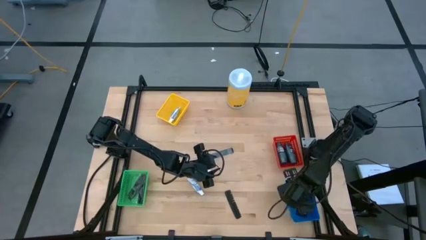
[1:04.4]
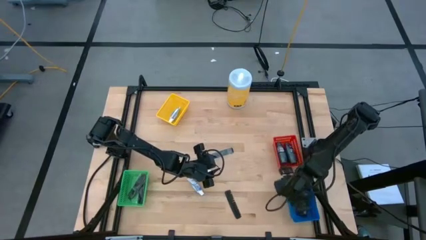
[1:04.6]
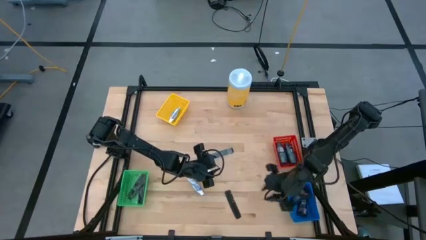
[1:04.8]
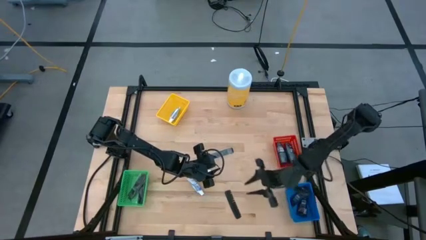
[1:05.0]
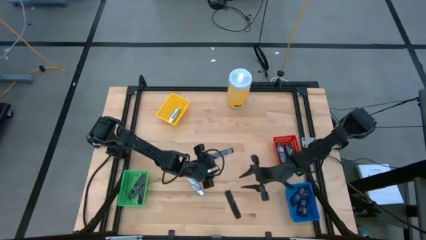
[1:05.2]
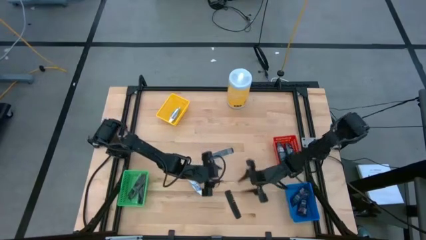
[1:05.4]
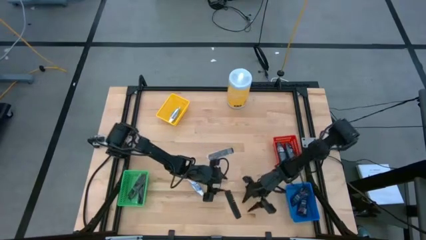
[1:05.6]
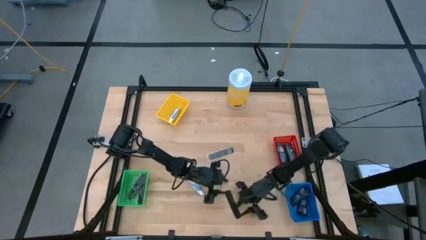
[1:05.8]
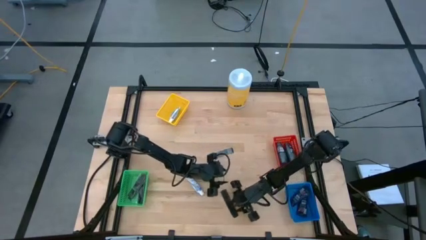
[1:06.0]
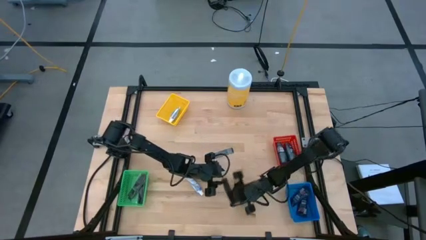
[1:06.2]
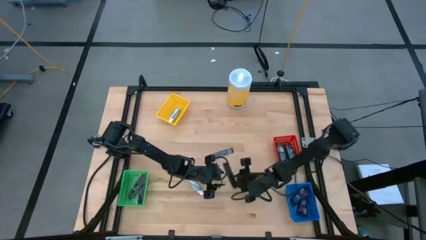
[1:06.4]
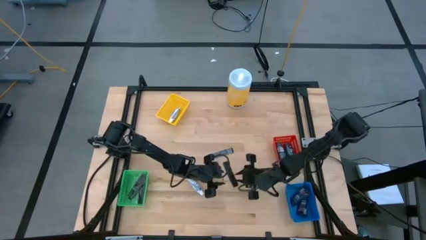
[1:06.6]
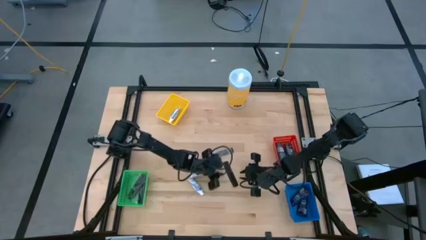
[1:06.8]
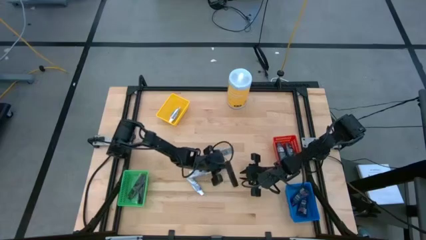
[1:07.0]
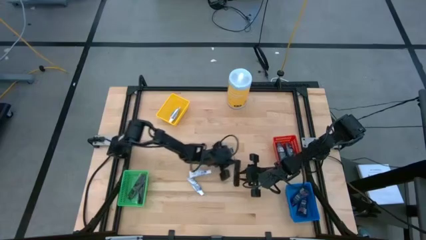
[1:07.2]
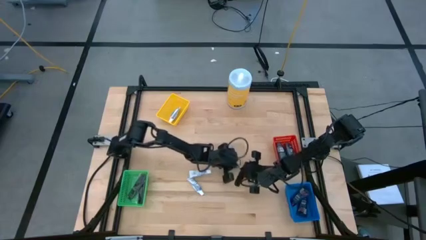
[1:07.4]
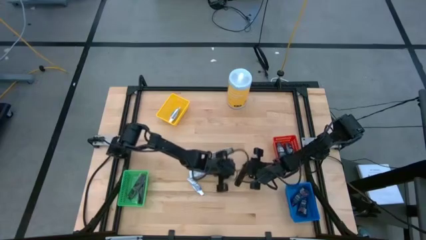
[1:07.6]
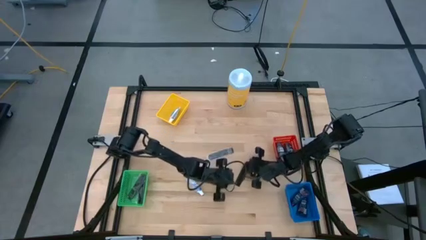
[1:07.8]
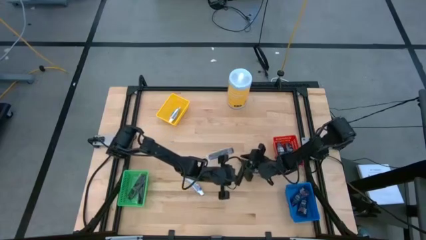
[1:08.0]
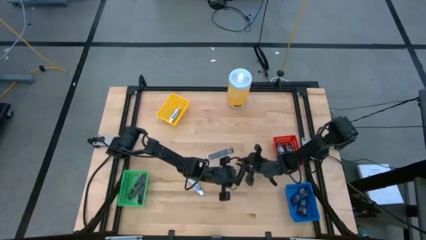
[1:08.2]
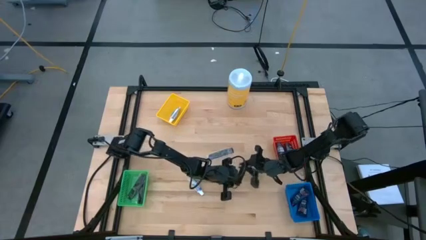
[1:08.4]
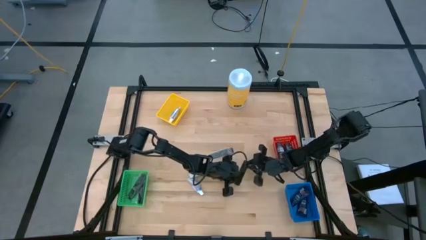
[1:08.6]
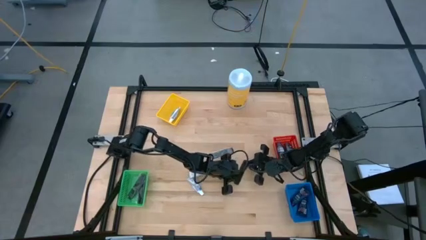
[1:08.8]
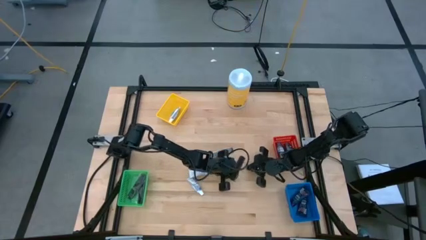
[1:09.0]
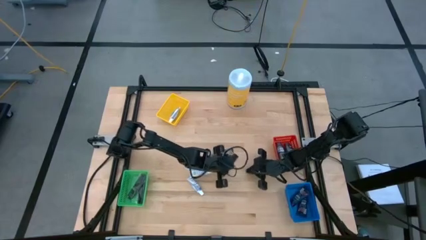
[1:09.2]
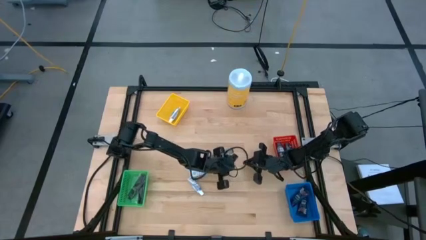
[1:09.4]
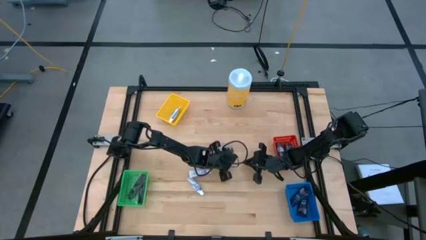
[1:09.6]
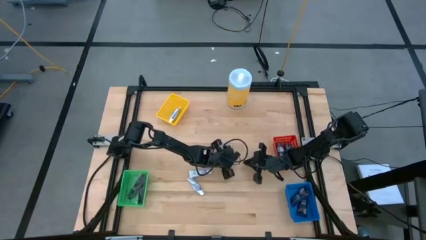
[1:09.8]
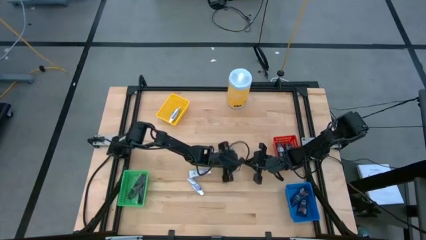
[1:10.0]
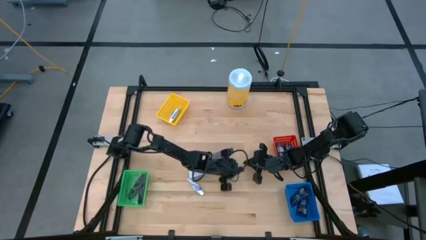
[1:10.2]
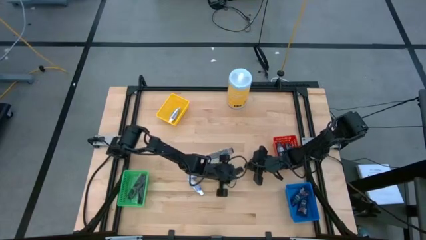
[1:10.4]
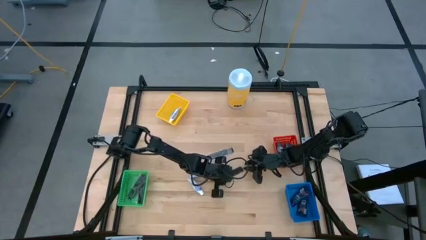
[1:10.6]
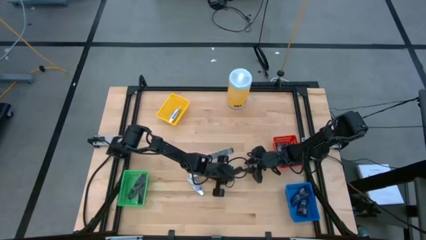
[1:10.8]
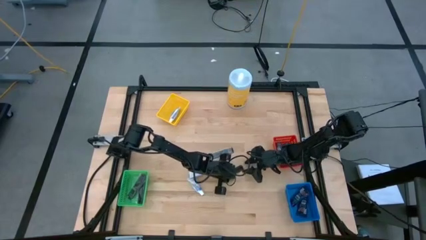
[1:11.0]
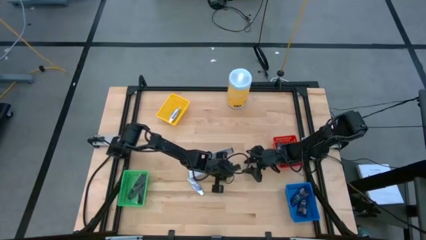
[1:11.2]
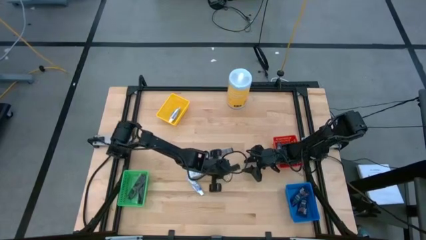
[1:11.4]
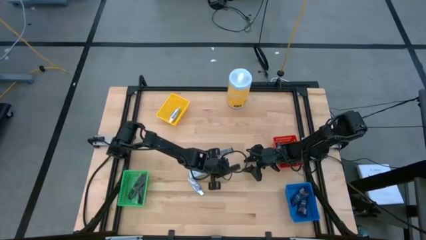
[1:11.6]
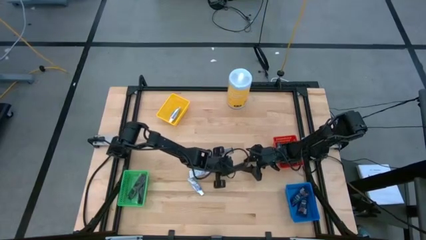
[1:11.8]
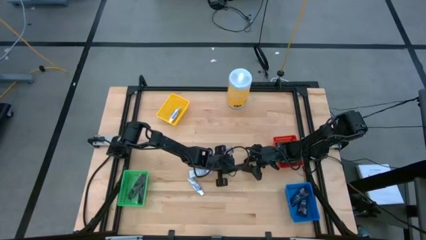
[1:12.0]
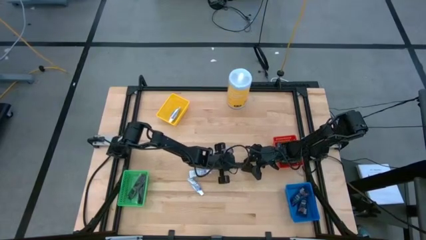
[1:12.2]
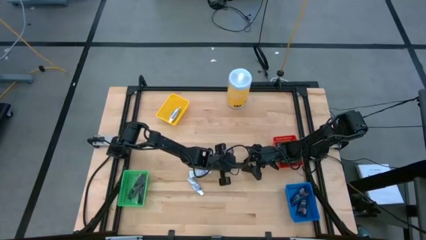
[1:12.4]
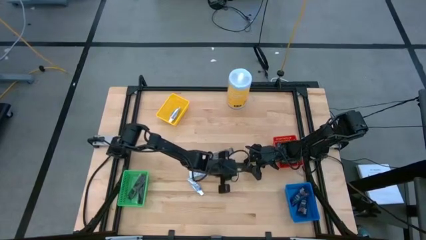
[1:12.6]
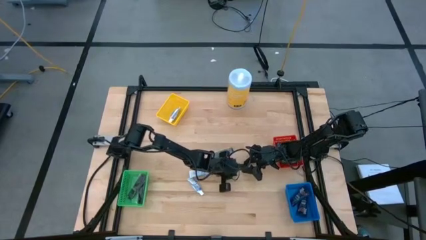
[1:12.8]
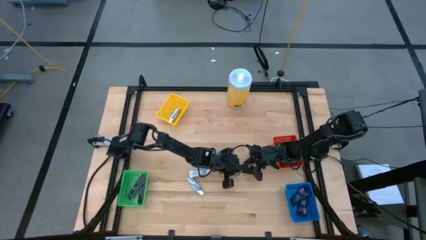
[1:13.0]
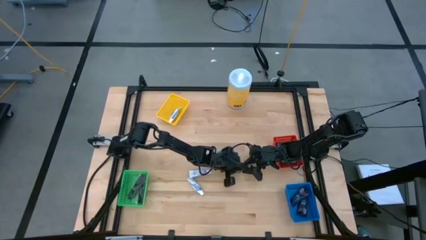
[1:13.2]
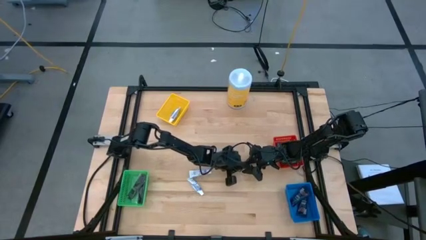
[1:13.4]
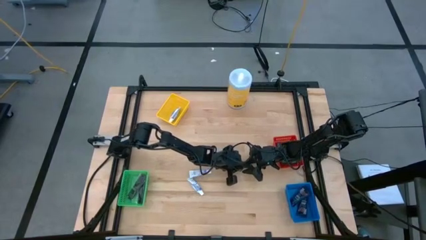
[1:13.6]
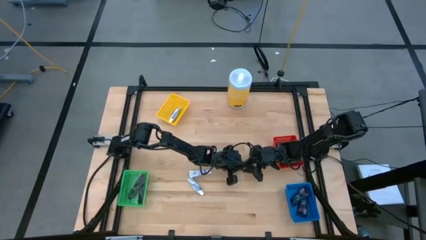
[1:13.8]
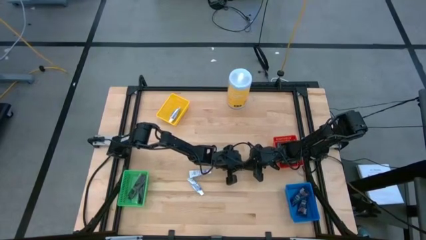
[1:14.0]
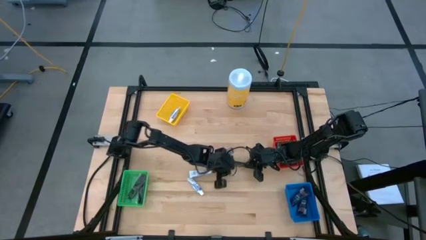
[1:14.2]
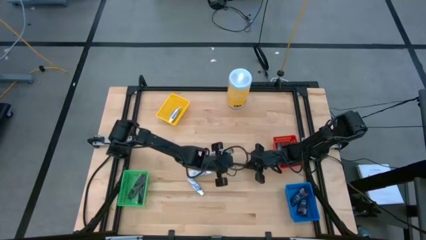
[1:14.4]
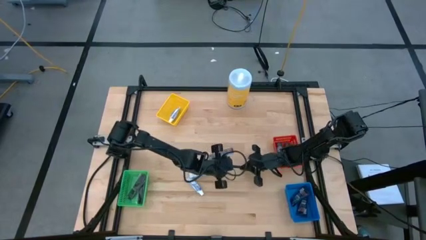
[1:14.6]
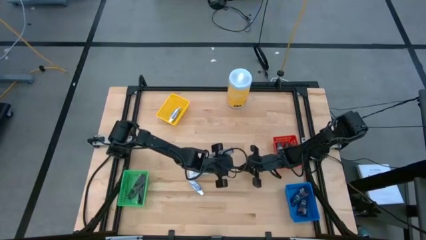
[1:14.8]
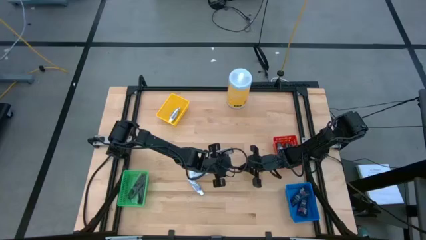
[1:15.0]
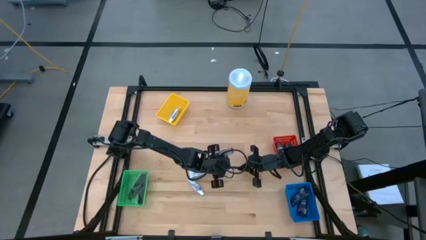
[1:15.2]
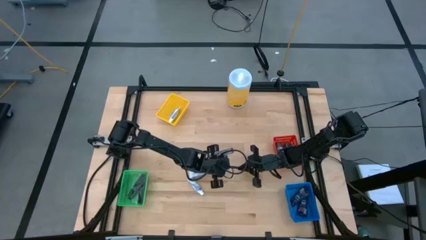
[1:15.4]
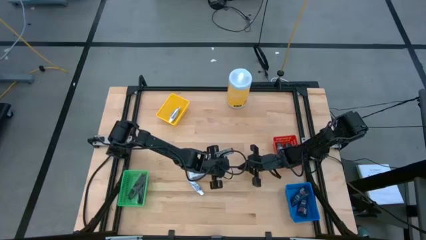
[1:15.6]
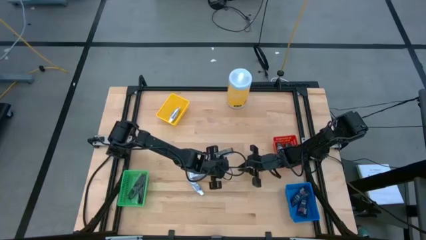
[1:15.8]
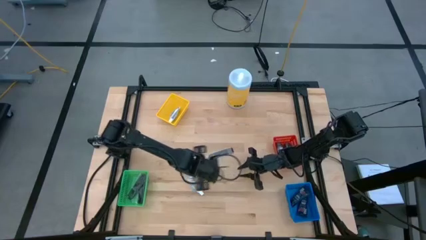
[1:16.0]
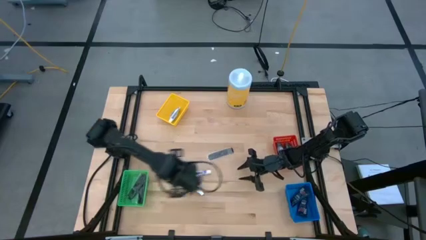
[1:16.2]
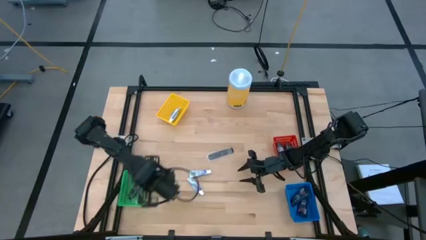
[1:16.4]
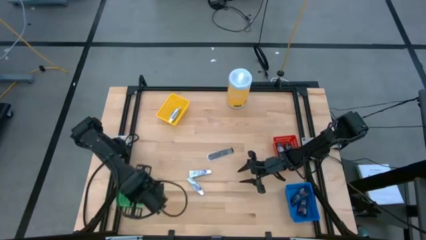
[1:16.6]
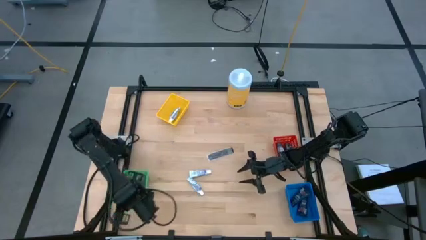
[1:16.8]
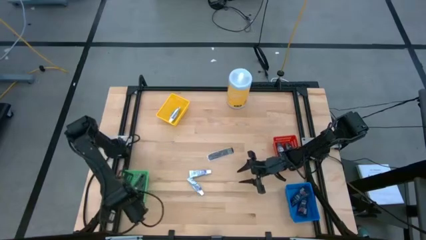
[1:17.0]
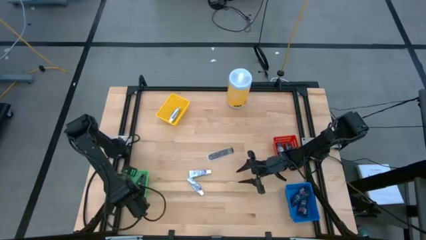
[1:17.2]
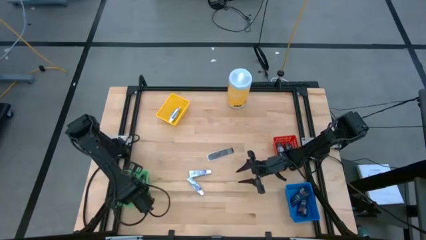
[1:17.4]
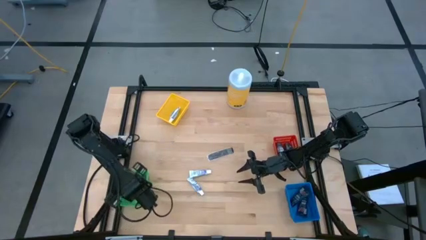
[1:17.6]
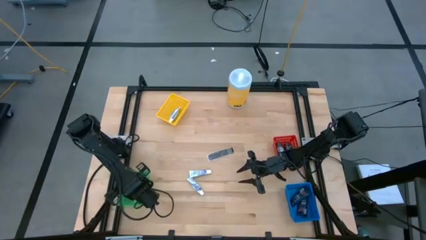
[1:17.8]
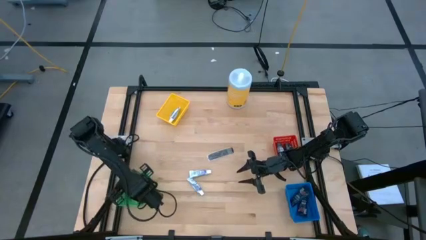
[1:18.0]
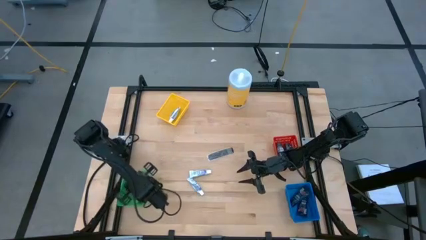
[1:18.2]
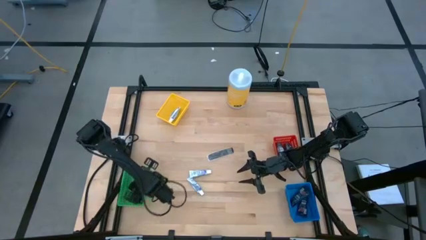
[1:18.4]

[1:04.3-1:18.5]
Task: Pick & Place Travel size toiletries
Put the black comb into the green bin

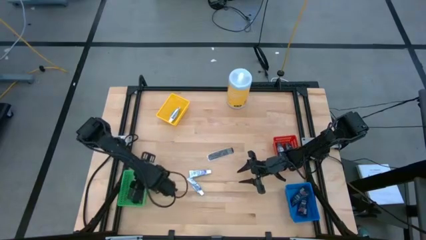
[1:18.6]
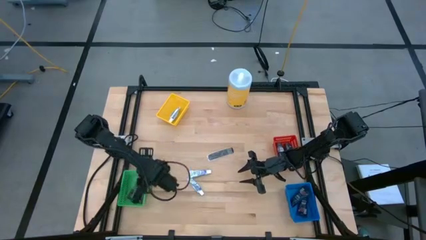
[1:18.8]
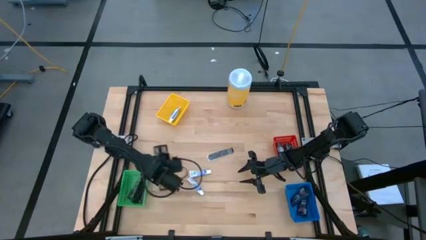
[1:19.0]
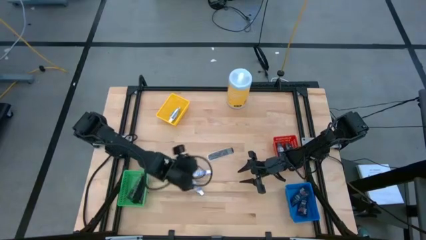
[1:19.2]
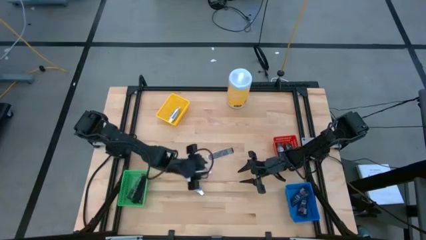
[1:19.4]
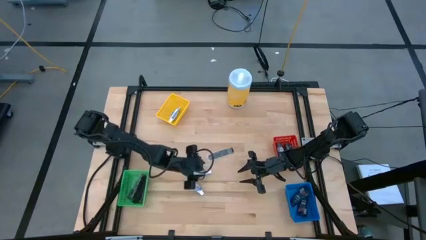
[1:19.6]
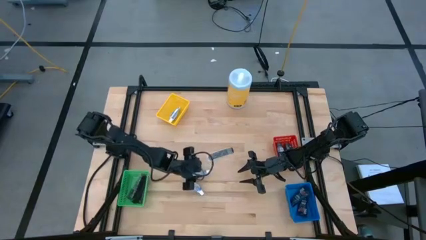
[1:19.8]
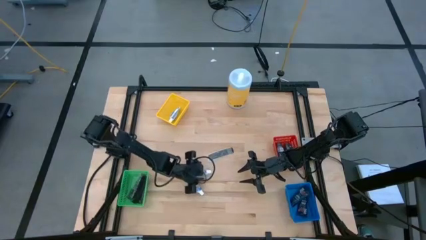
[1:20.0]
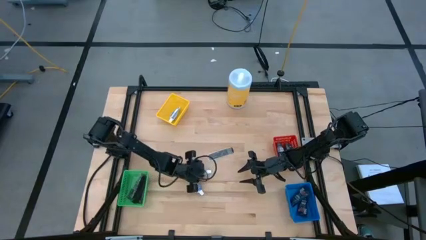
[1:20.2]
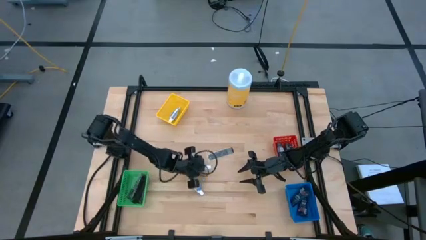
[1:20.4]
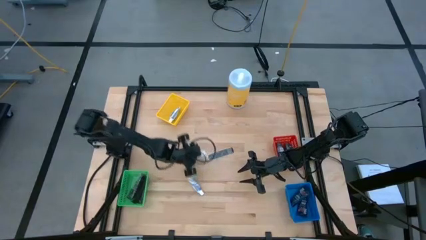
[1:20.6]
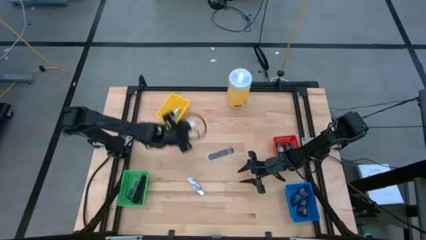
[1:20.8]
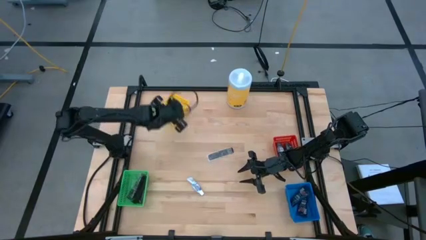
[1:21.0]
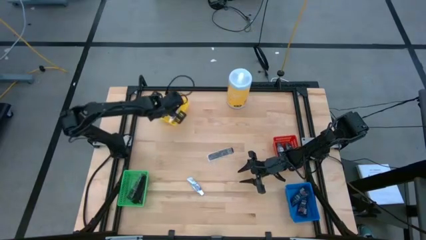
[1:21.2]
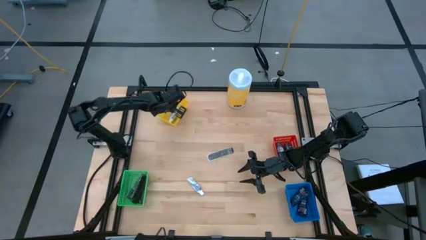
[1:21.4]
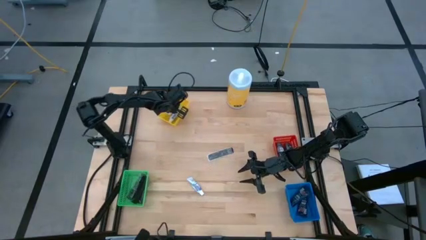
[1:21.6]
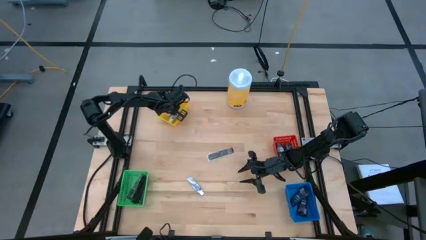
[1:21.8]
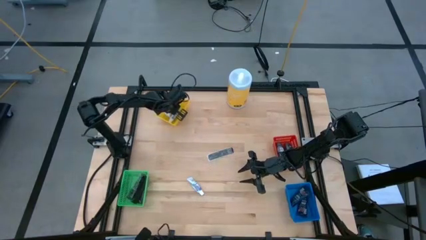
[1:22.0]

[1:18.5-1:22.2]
Put the toothpaste into the bin
